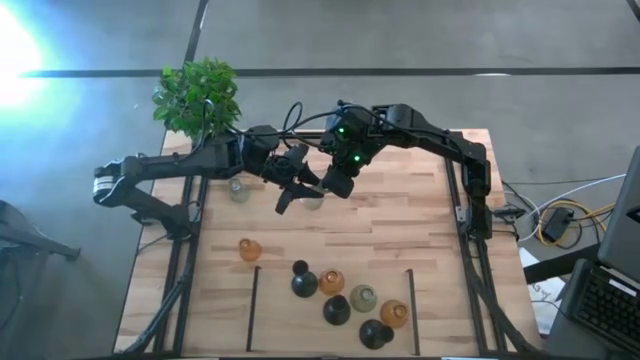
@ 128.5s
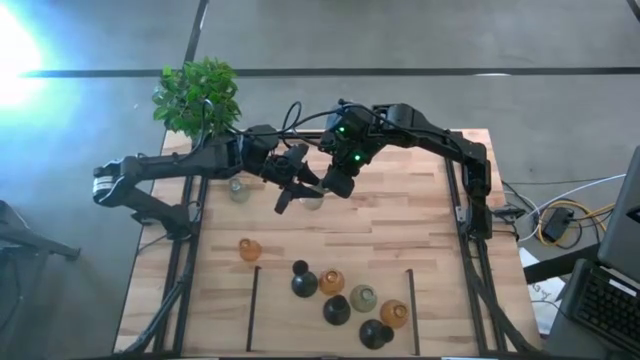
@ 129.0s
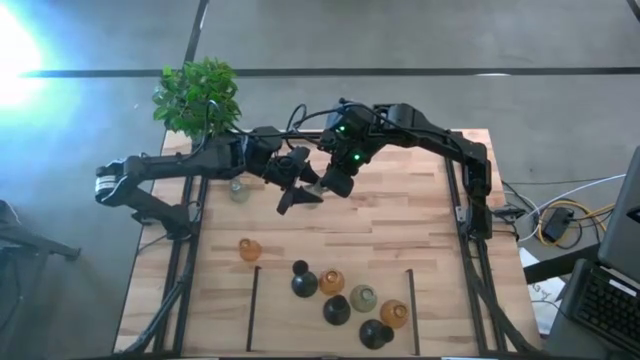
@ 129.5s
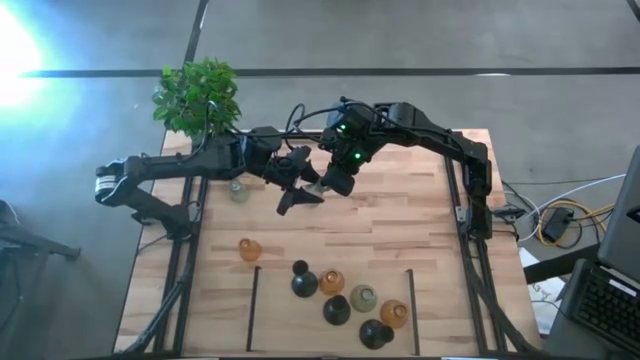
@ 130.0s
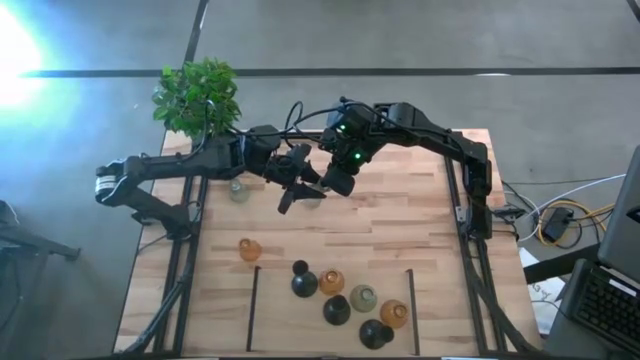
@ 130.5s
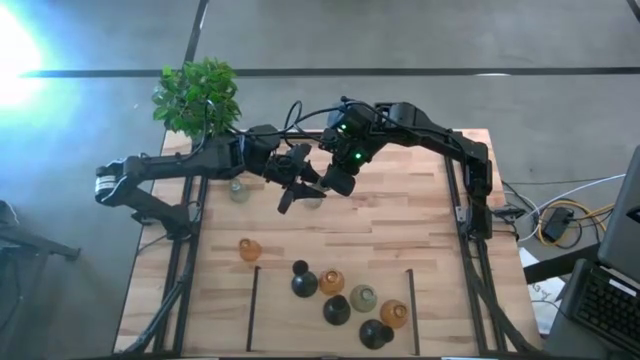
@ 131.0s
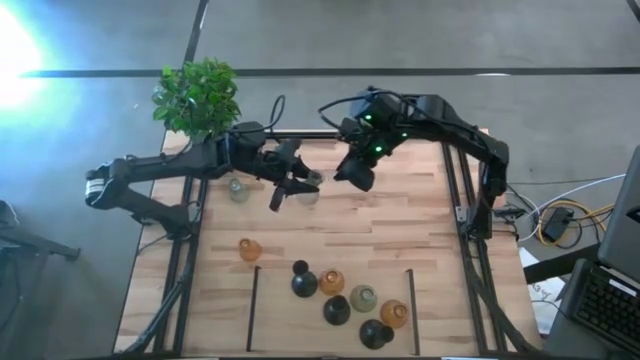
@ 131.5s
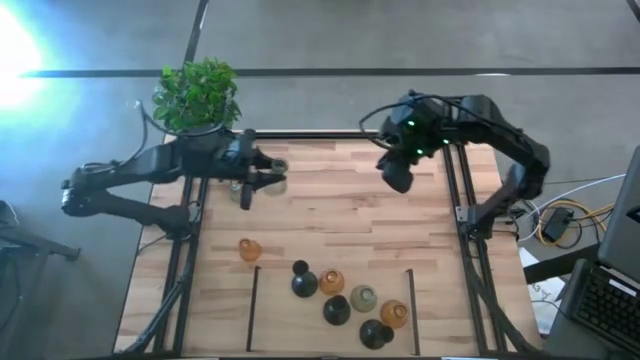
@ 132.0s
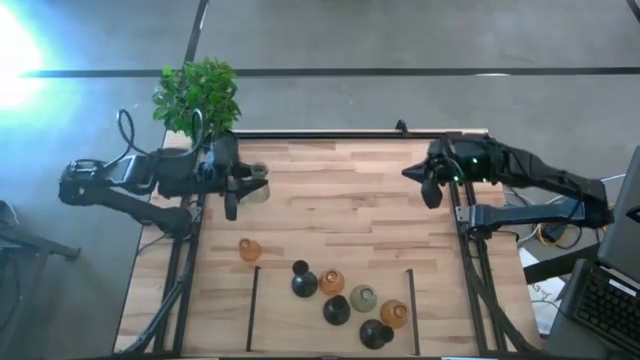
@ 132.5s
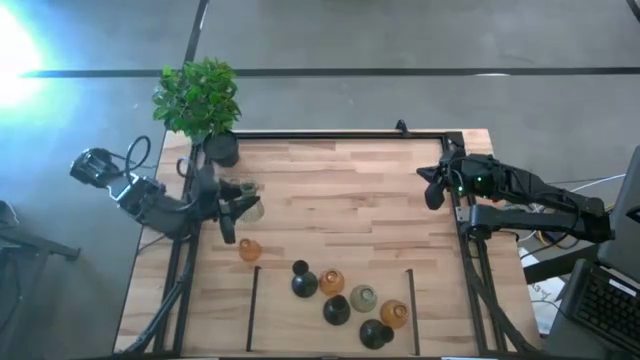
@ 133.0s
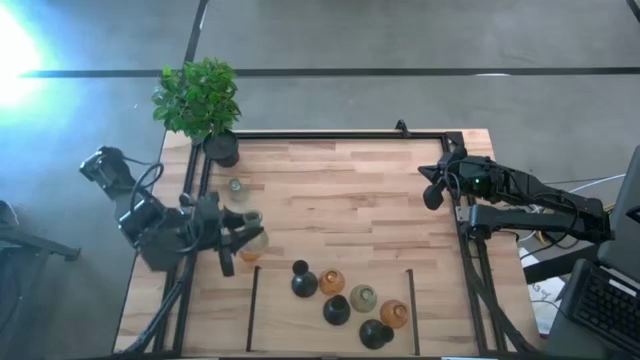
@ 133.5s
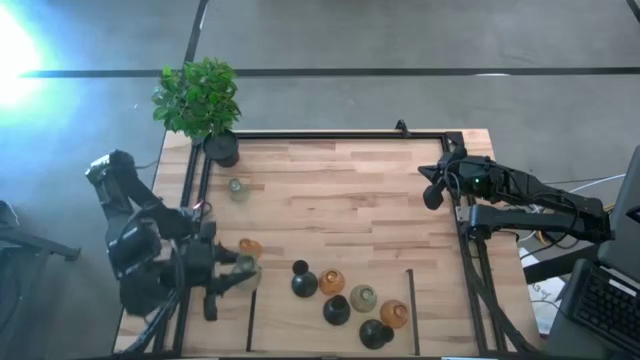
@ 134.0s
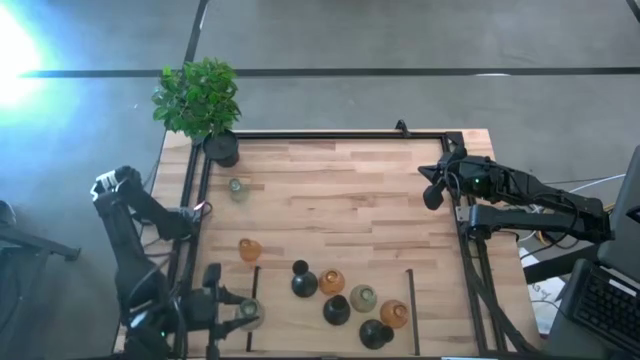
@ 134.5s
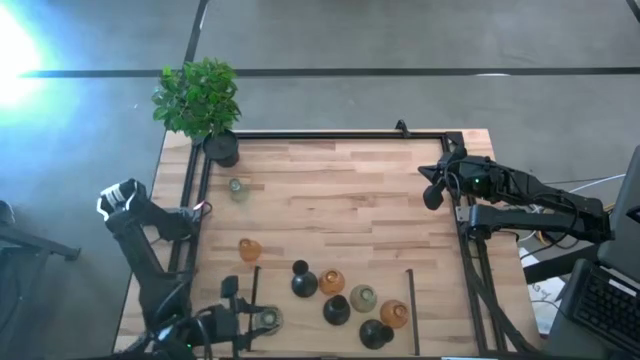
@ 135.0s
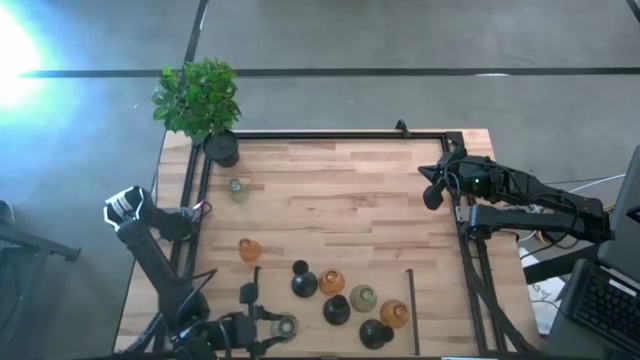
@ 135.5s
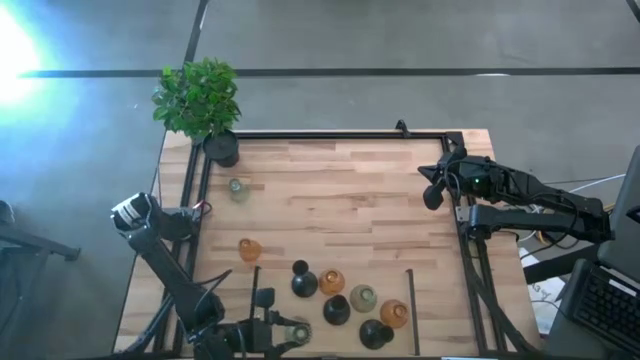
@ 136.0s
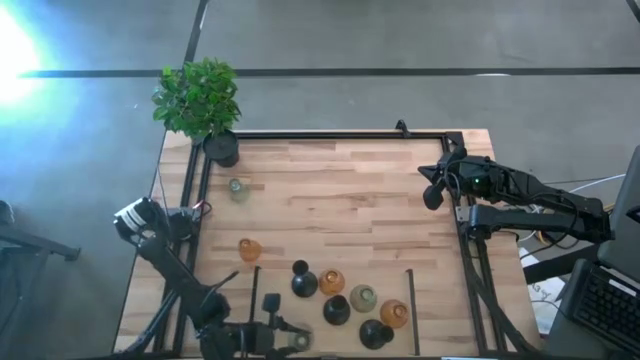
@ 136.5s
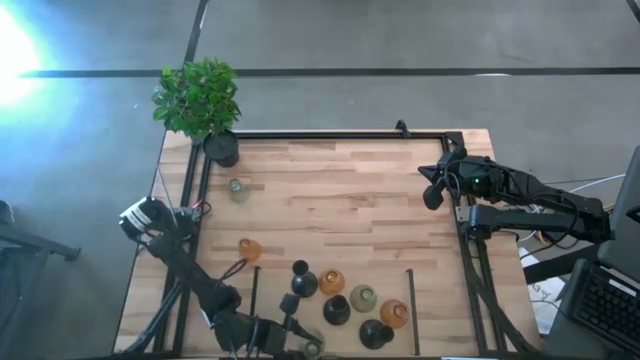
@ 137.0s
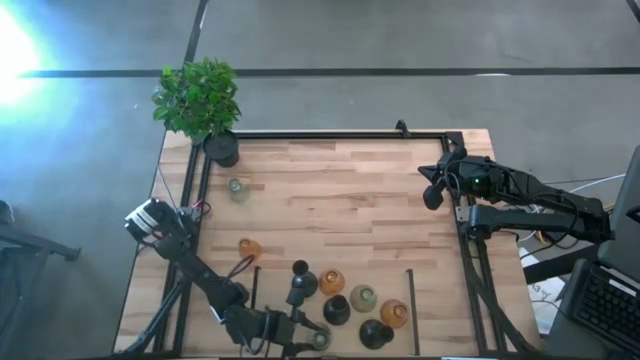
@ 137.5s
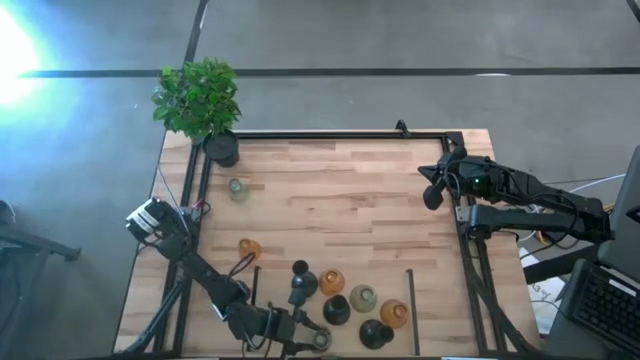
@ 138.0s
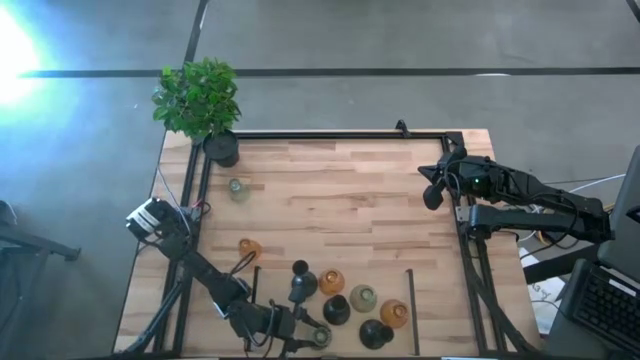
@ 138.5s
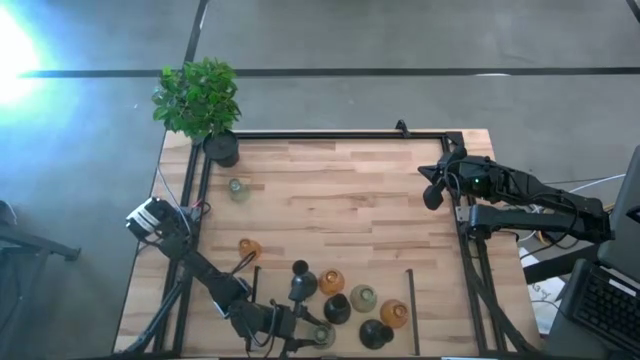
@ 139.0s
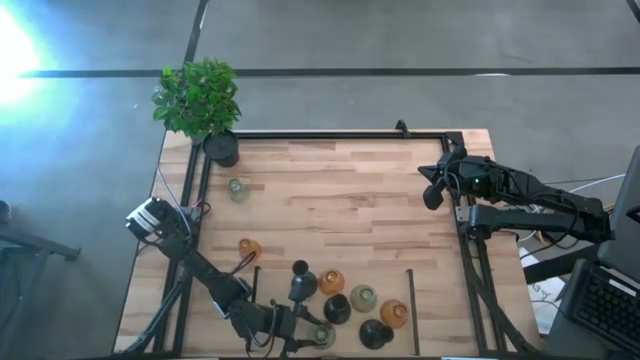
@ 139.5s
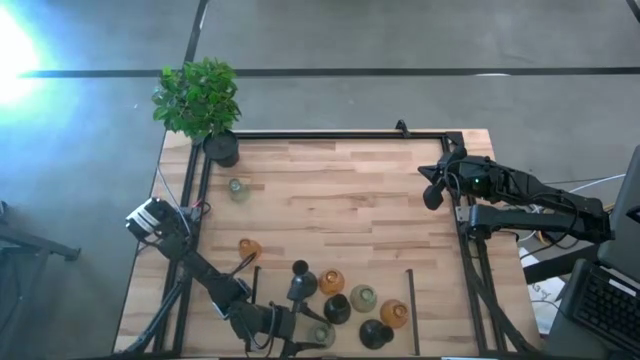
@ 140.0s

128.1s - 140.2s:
Task: Pick & Place candle stick holders
Put the right transparent glass candle holder on the shelf

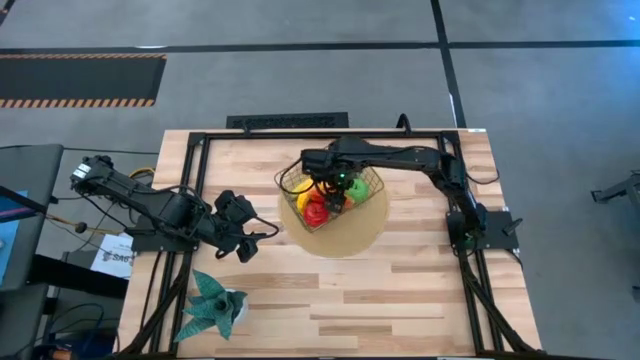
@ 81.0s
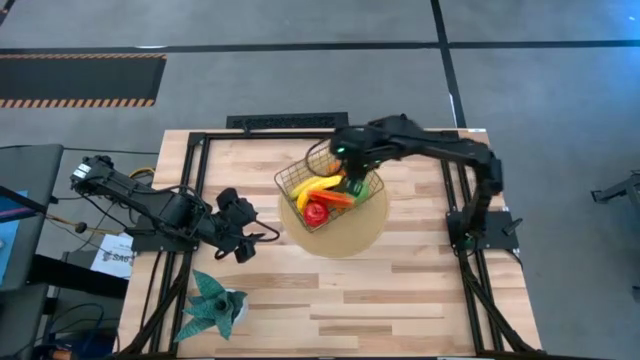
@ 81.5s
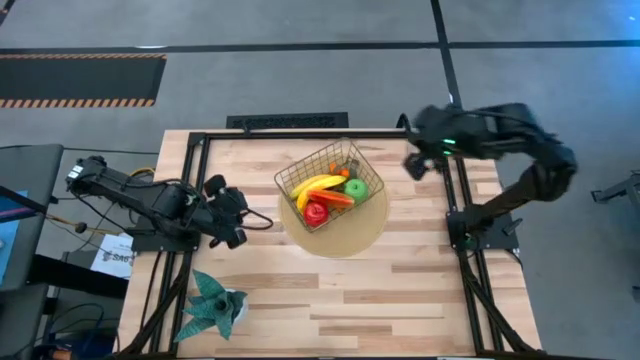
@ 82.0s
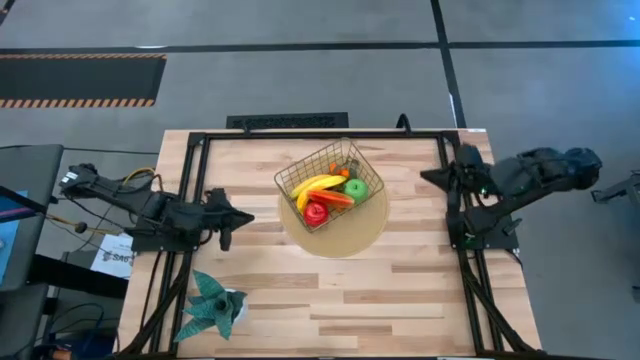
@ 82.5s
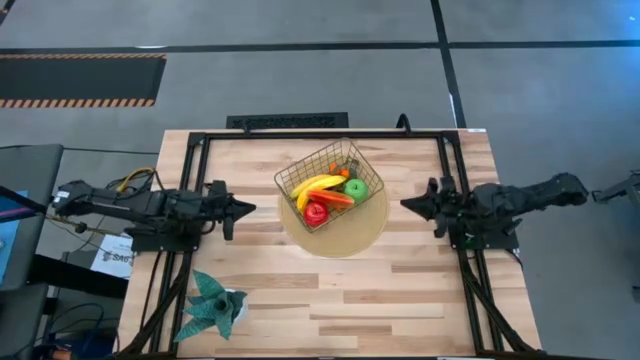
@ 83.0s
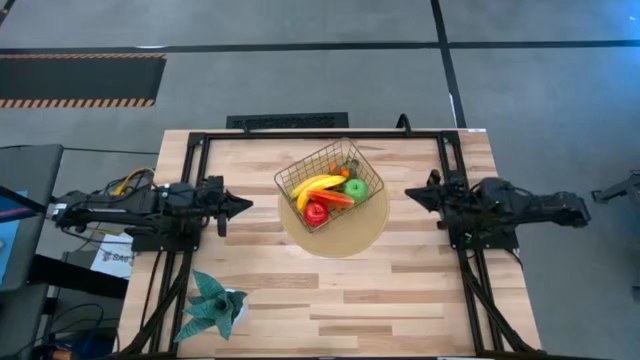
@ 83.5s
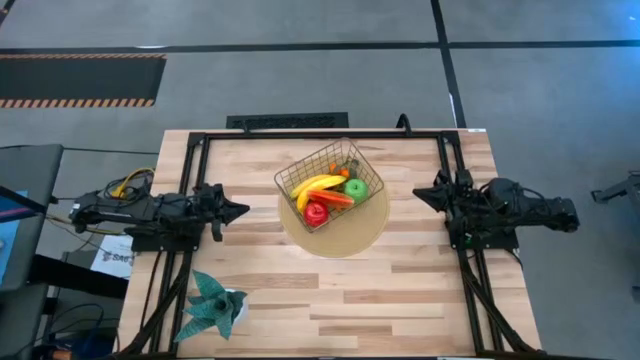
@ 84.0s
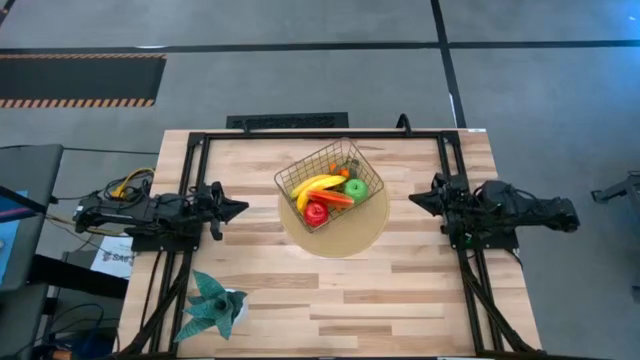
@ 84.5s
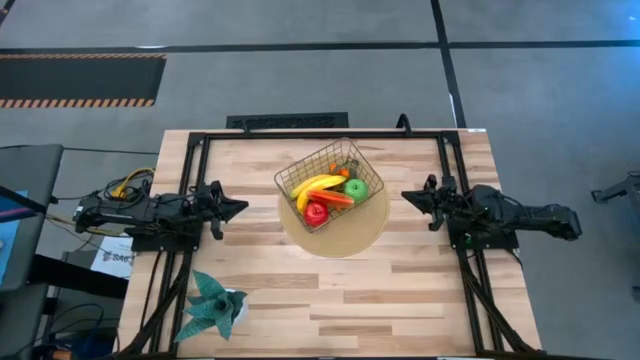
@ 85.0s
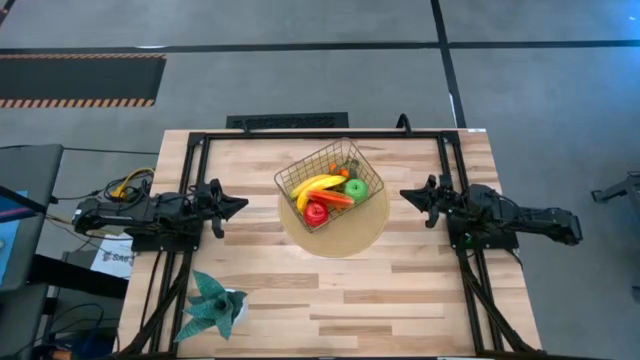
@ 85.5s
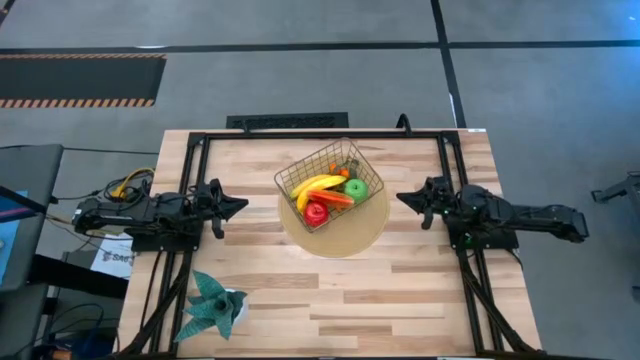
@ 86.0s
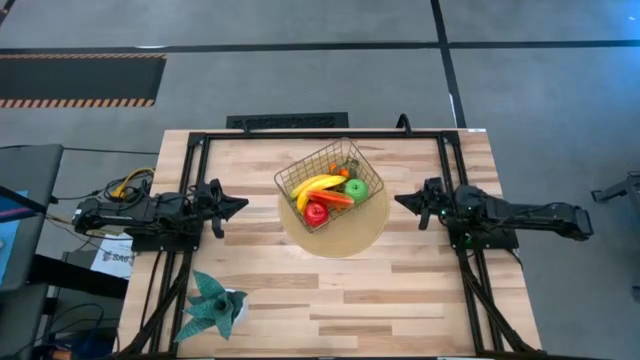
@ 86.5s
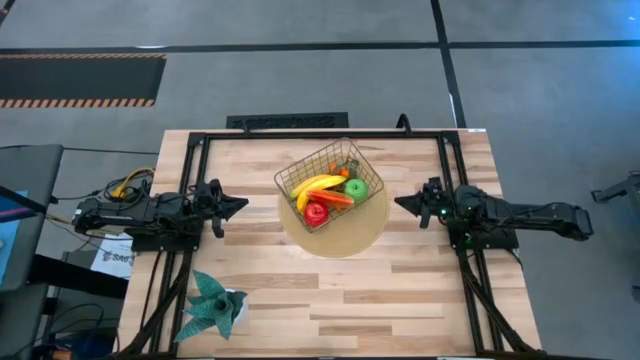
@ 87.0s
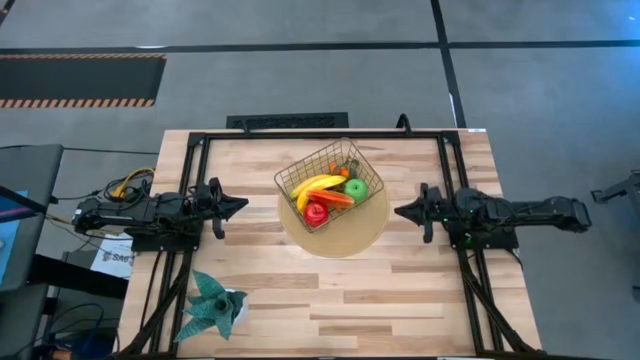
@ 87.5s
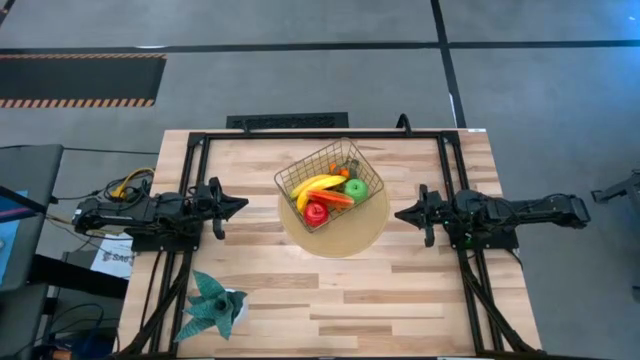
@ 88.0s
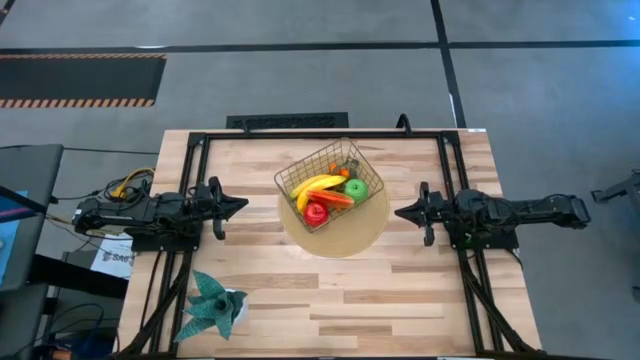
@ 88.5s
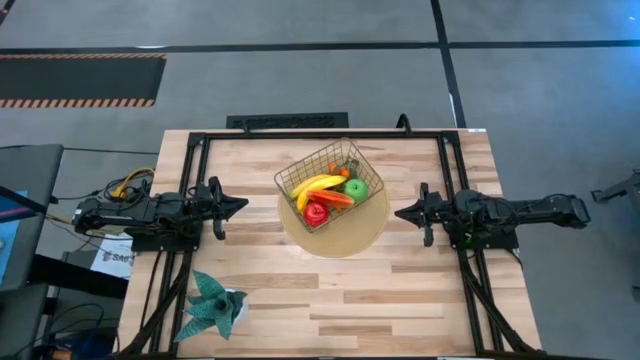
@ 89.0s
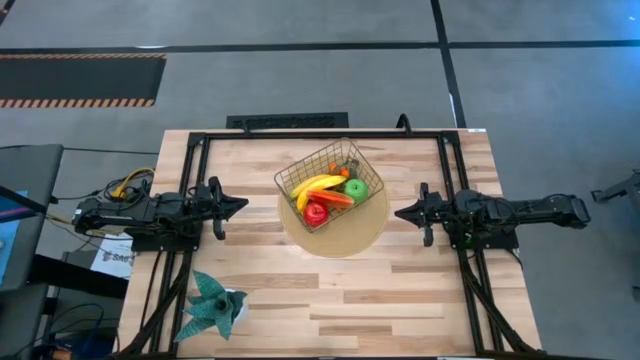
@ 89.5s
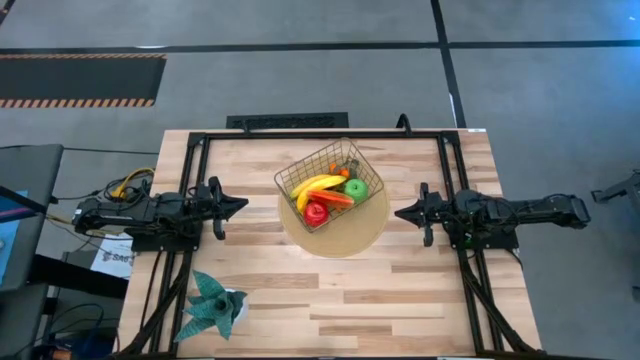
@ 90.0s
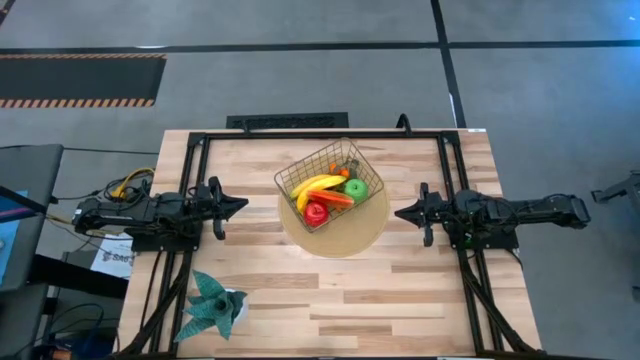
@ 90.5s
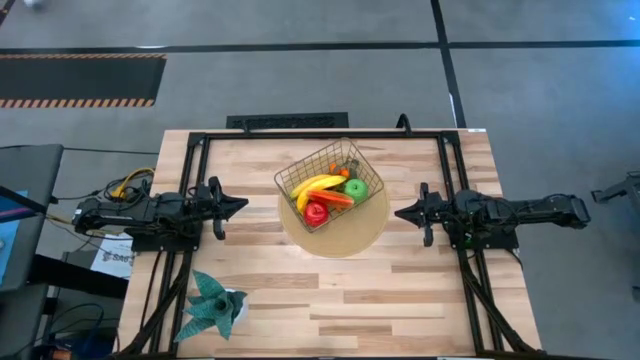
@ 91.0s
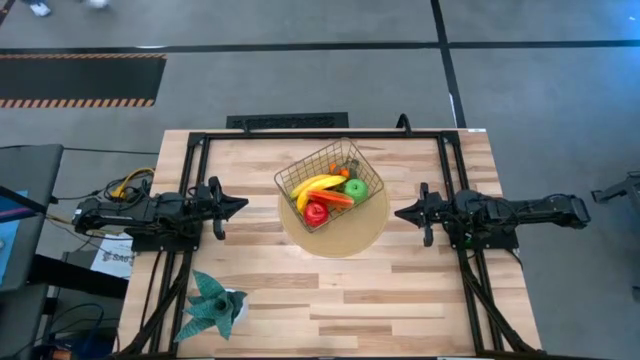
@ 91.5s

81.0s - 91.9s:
Task: Build produce basket
Return to Home Position
